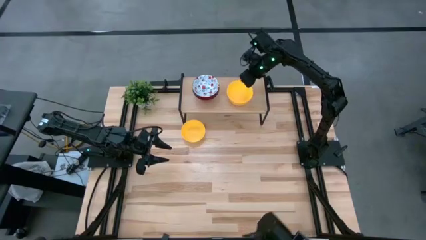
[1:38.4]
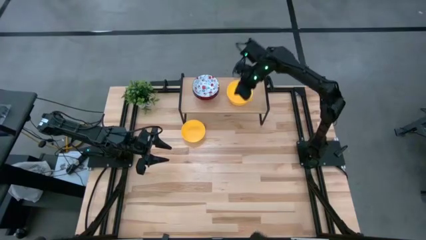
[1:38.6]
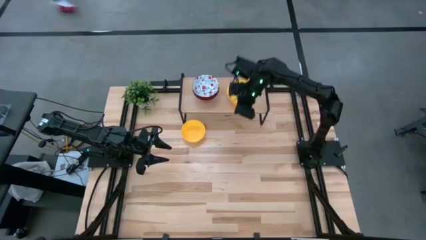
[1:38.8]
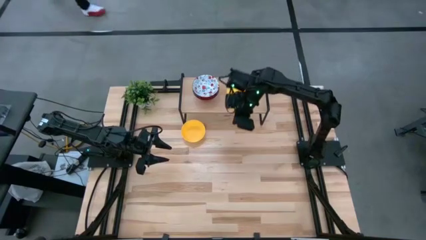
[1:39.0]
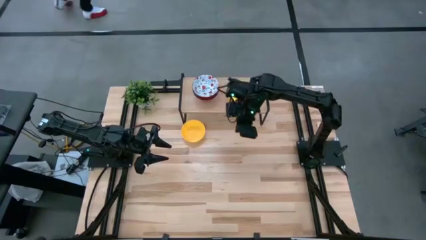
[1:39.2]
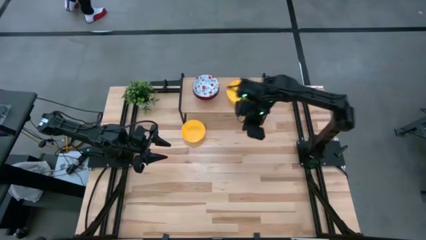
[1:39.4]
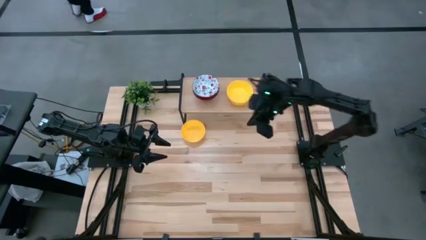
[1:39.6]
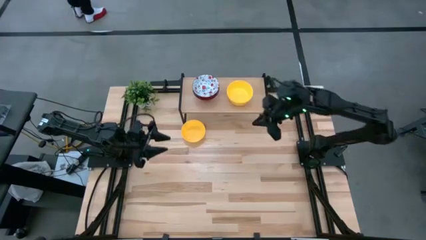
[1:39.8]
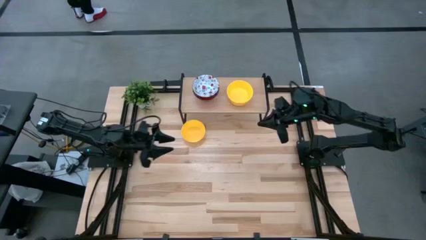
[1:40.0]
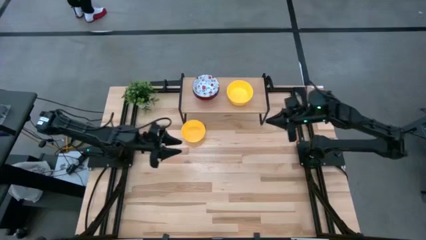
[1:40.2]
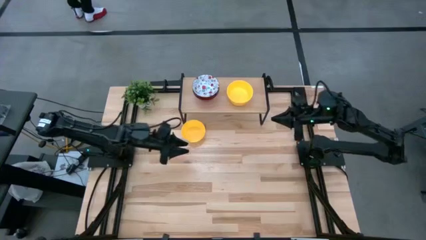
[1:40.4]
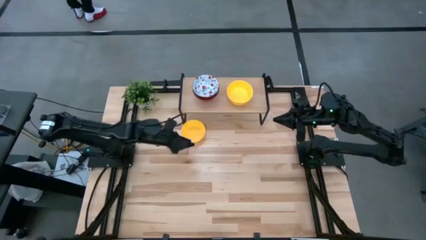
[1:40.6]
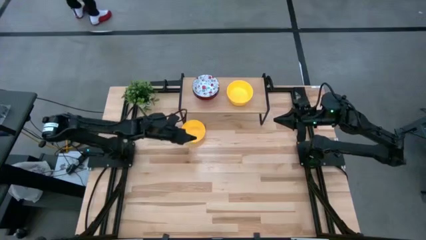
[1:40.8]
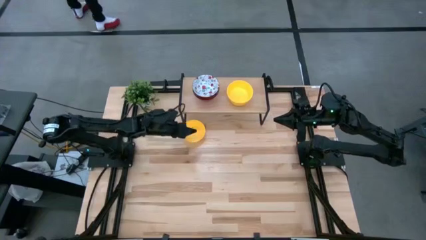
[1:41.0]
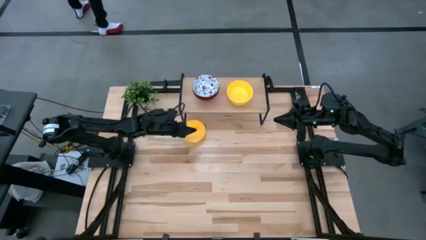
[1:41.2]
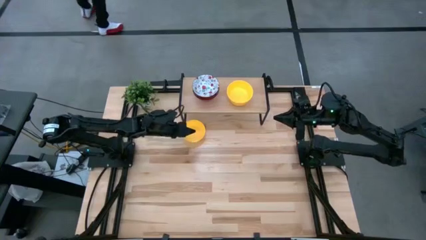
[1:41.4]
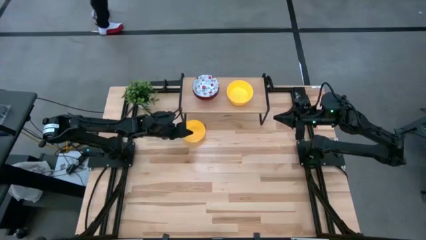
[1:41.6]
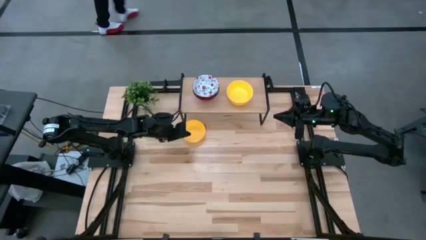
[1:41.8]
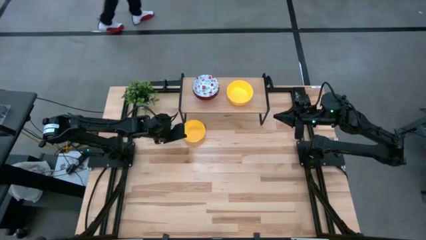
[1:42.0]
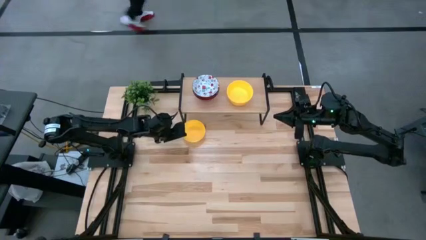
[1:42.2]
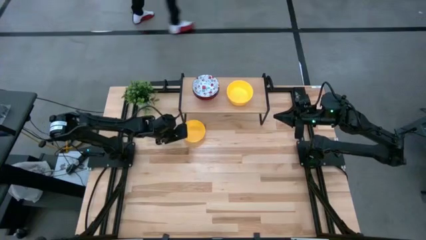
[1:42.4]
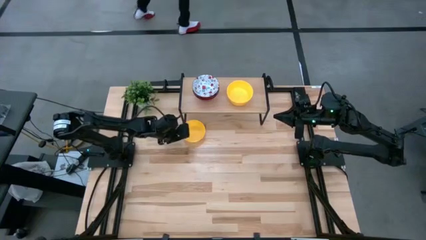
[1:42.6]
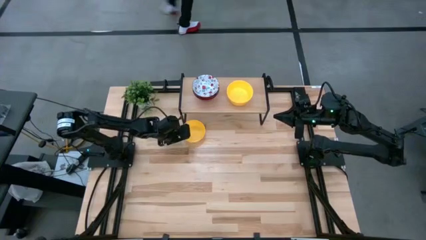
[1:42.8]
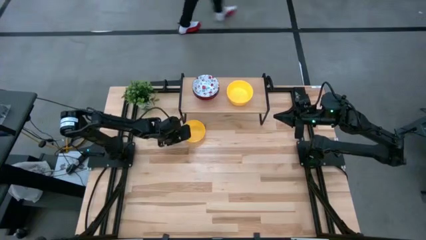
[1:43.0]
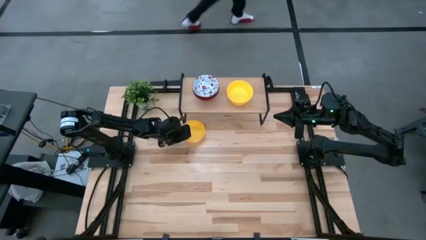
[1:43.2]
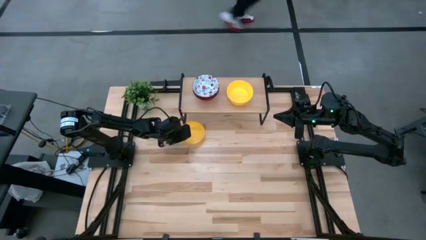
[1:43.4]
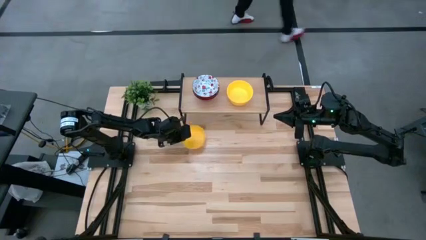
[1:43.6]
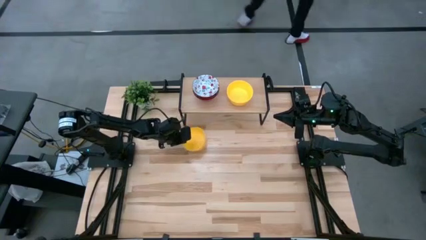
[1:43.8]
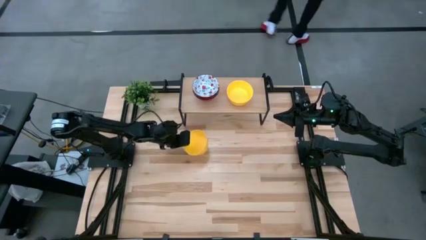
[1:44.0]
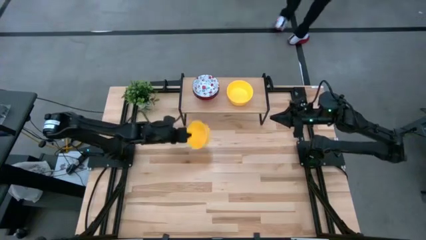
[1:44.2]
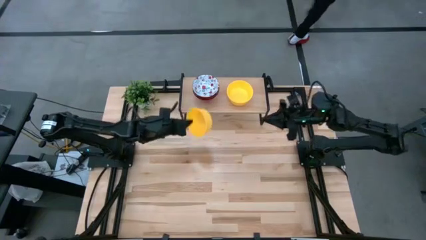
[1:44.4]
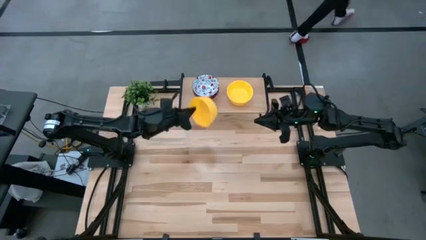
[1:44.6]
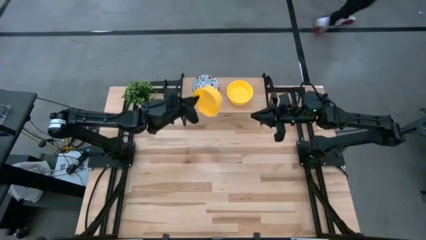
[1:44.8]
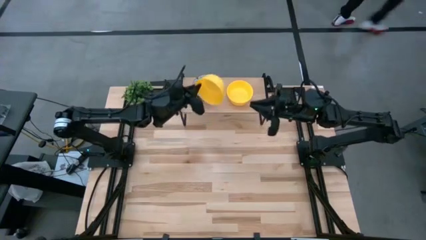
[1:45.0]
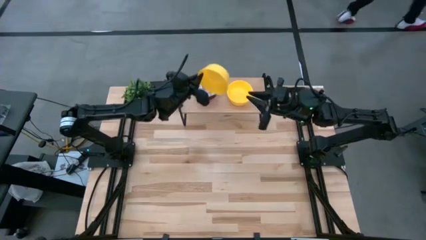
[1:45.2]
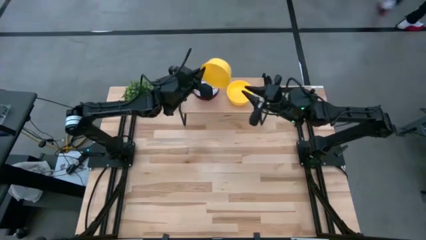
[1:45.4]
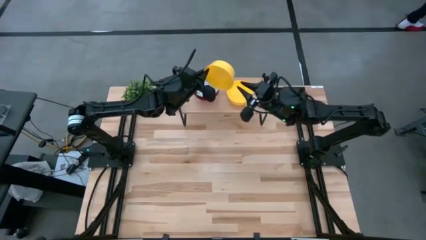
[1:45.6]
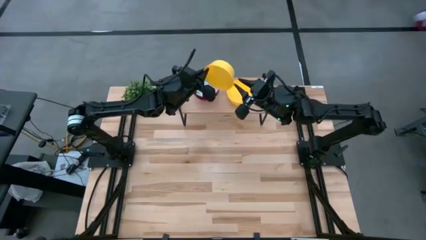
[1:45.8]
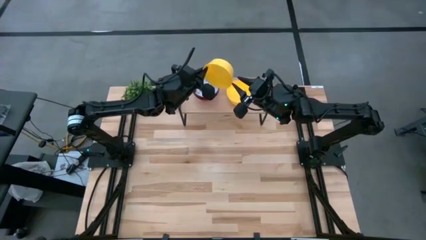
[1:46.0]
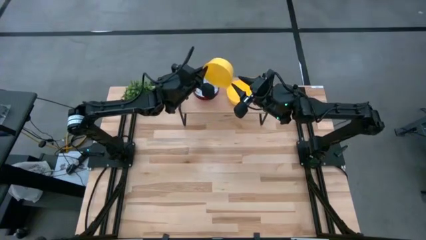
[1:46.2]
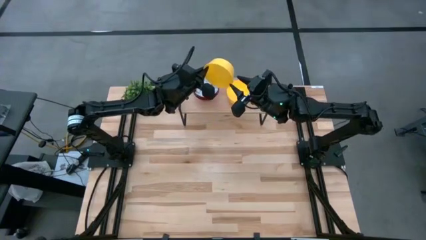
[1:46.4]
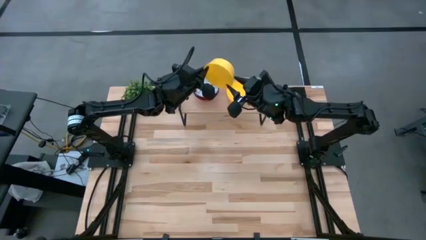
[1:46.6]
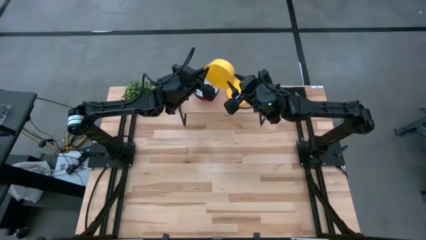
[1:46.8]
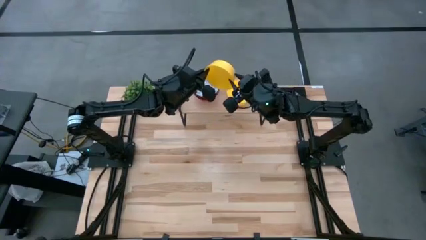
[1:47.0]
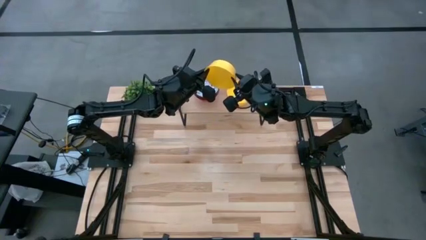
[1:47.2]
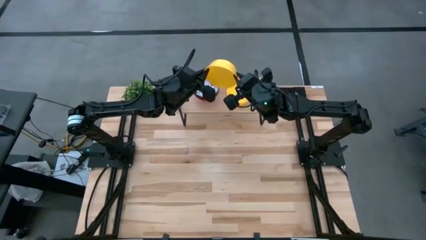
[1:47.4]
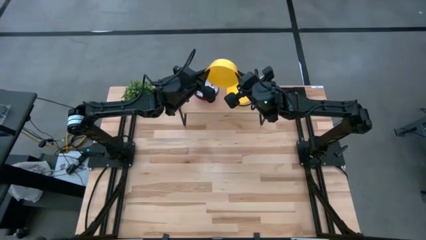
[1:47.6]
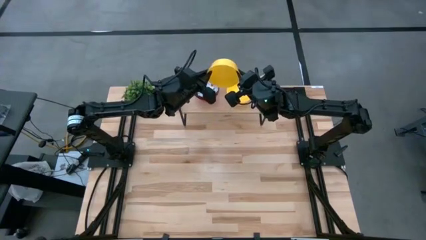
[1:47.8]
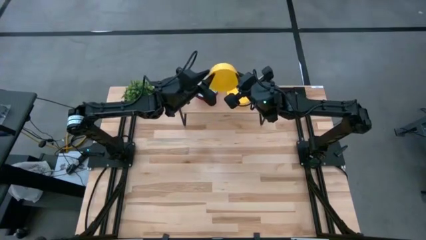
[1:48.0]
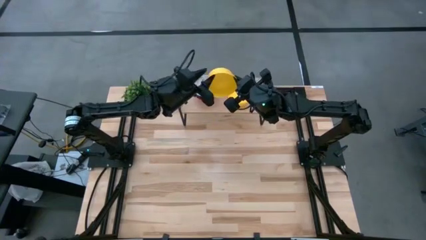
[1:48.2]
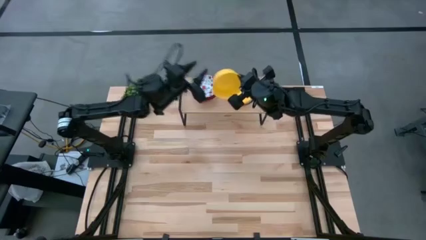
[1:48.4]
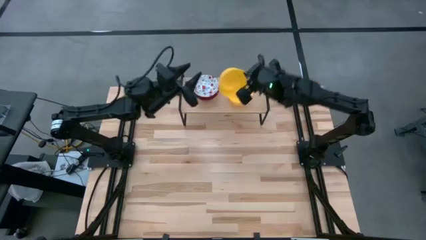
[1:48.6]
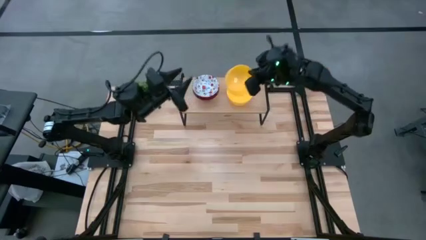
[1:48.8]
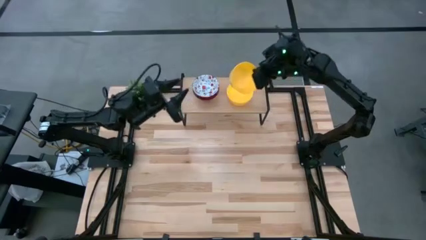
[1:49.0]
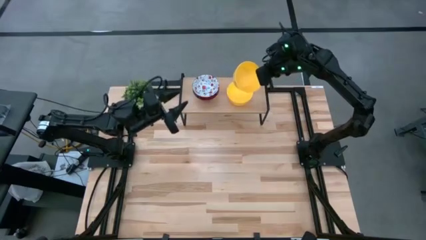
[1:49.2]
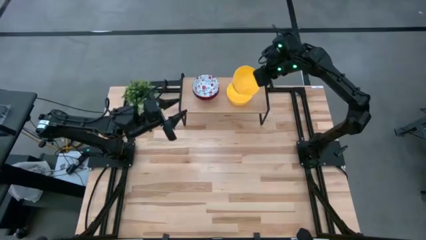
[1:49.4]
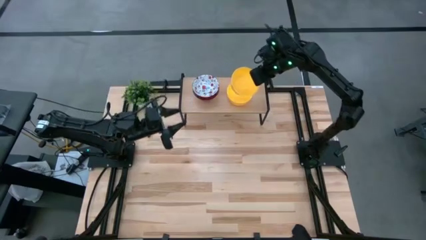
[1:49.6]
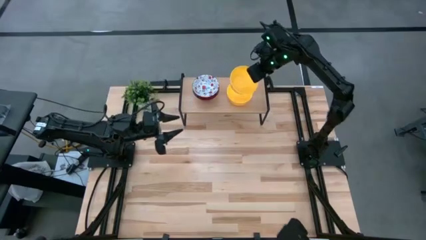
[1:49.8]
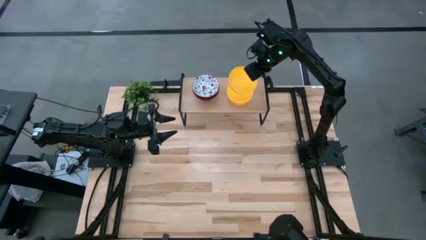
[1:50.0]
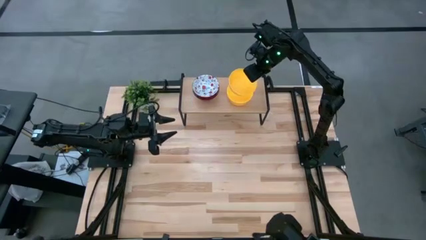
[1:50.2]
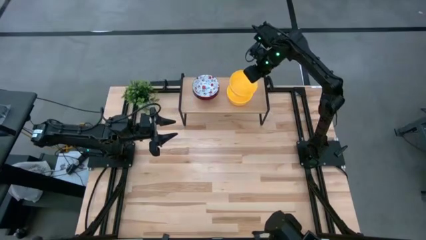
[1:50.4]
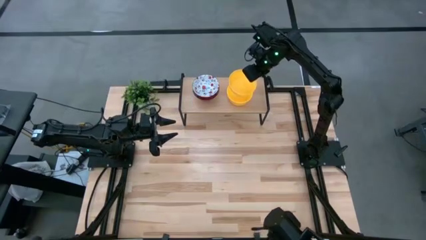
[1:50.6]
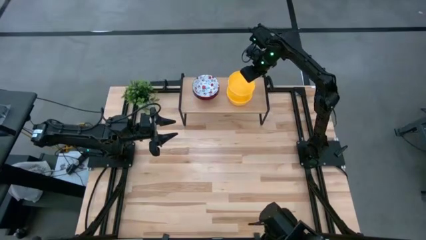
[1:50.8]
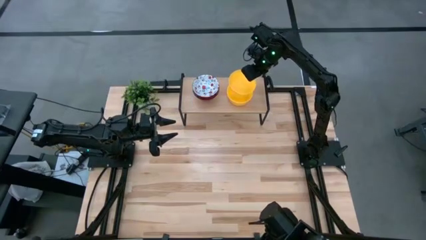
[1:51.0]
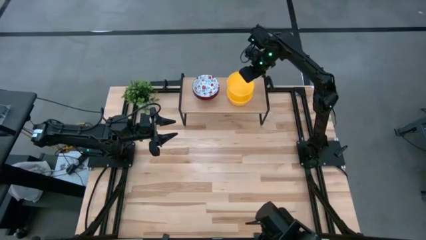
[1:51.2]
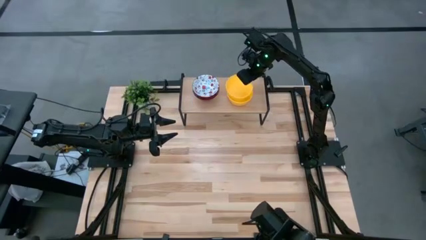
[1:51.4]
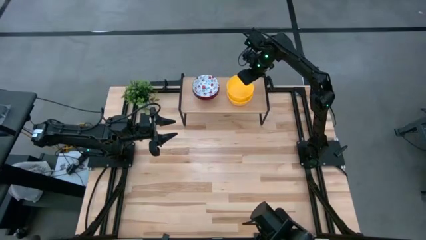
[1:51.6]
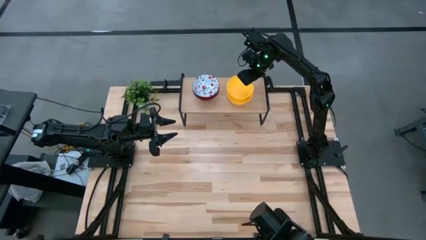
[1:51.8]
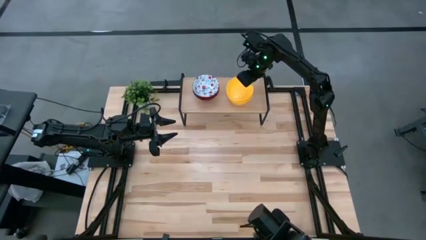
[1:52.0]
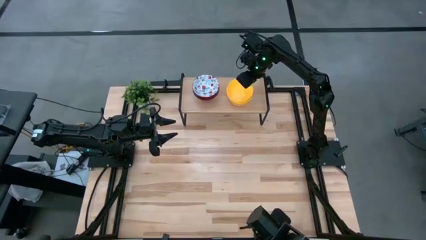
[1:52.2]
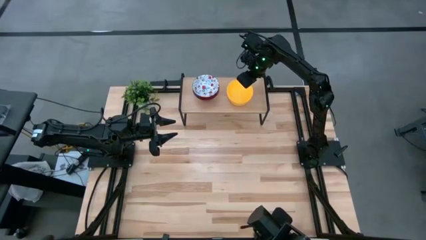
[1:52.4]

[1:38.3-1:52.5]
Task: Pick & Place Mini bowls
Stack the yellow bowl on top of the yellow bowl on the shelf

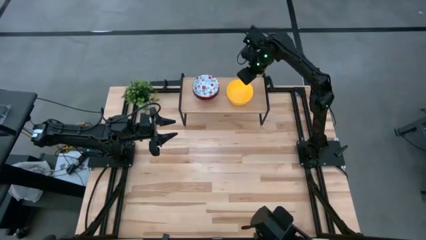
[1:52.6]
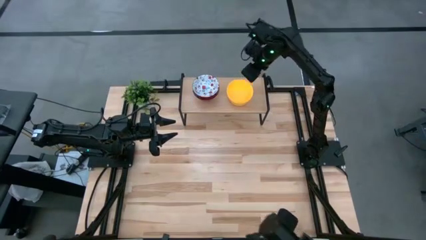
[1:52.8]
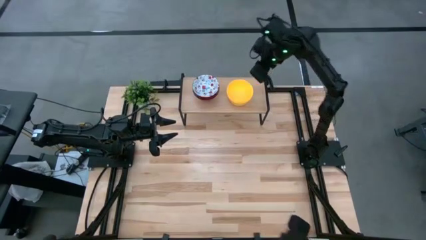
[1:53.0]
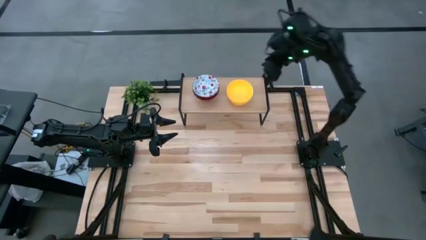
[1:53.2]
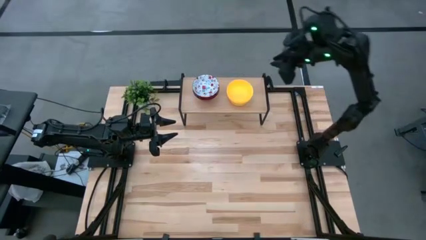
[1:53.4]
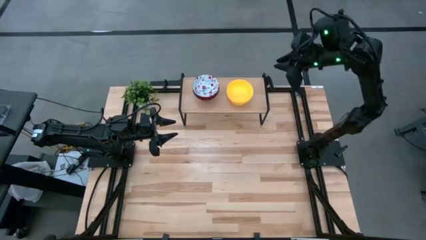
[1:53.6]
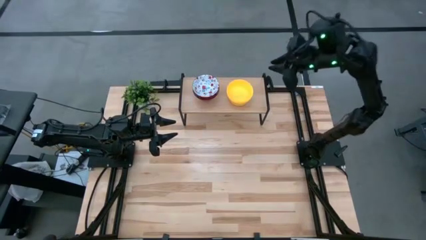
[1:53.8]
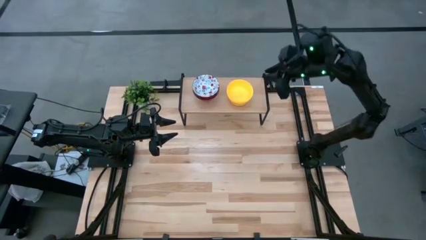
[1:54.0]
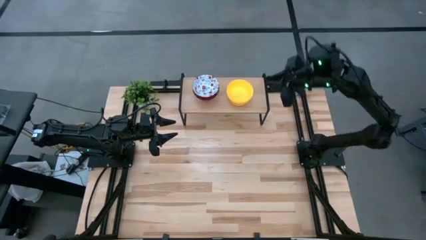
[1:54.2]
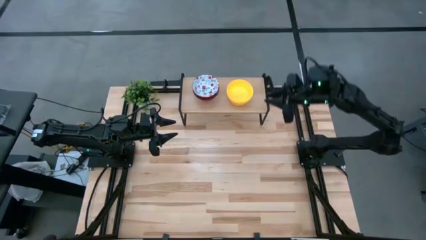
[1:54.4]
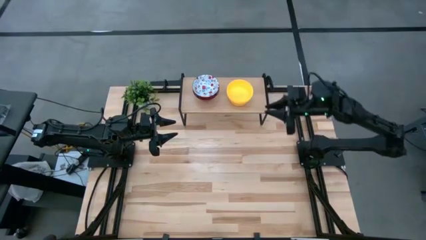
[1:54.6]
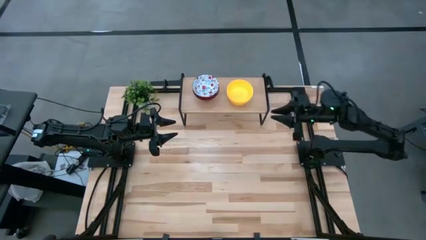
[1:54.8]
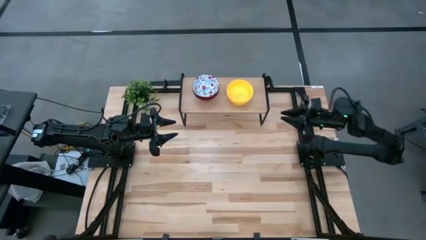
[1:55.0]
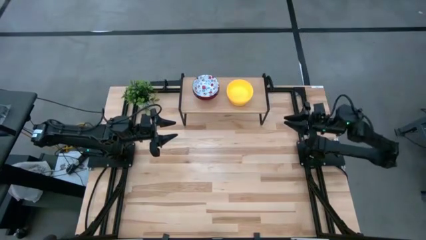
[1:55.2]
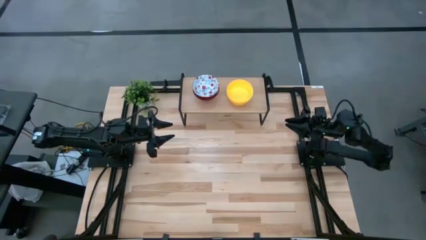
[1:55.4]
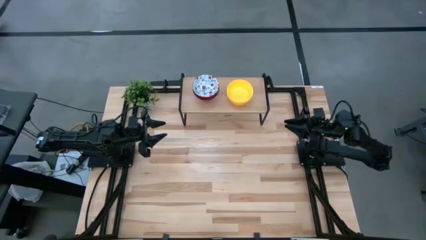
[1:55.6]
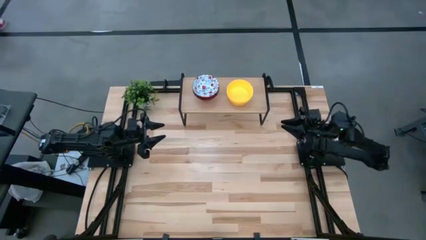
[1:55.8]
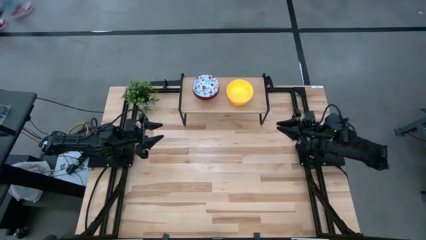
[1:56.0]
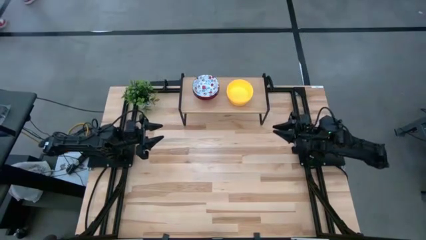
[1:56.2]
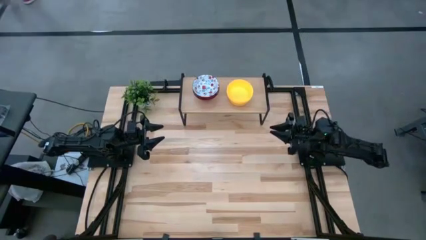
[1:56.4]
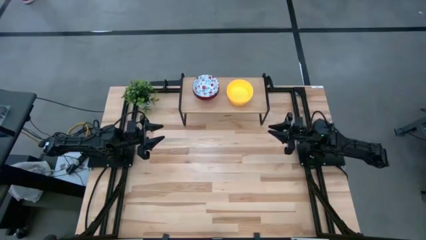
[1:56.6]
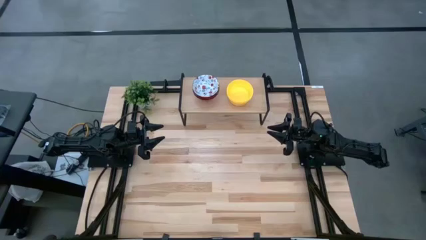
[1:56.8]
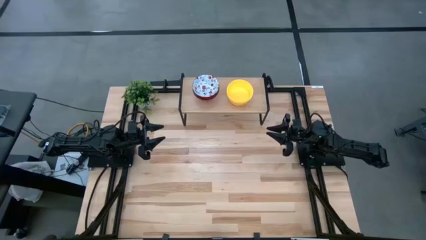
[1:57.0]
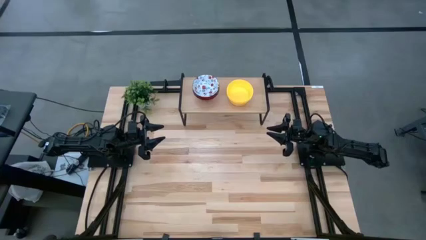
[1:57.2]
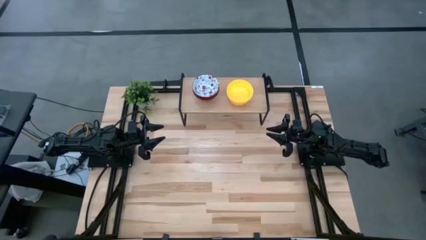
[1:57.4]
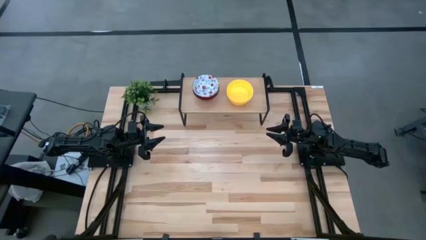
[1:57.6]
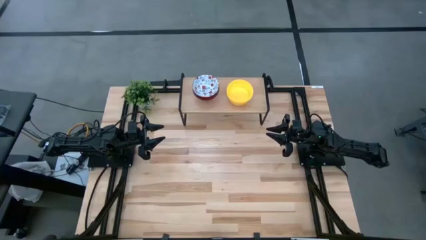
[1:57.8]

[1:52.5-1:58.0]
Return to Home Position
